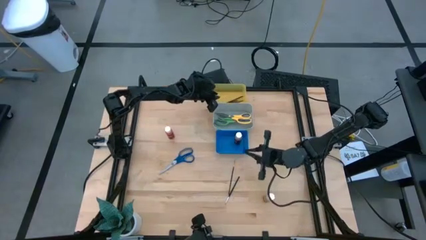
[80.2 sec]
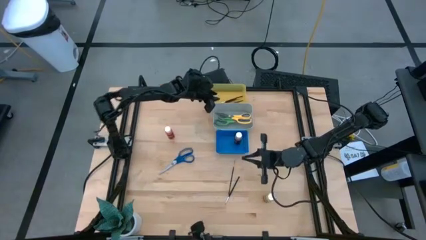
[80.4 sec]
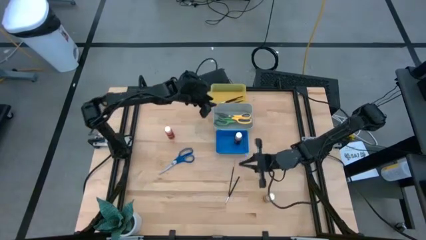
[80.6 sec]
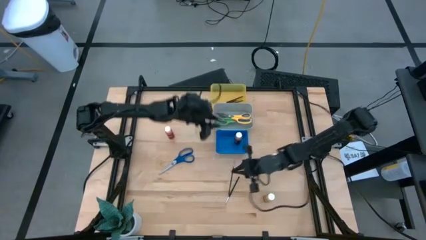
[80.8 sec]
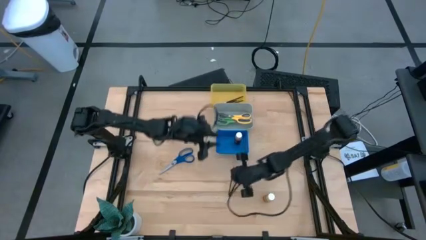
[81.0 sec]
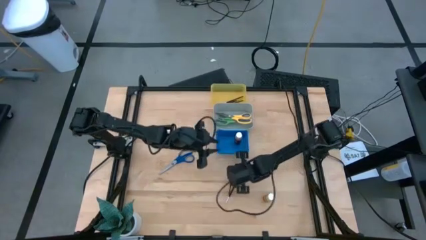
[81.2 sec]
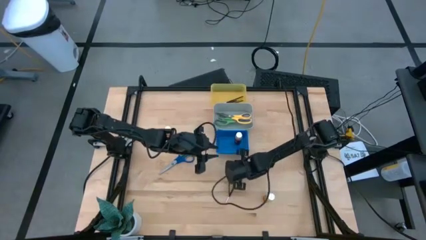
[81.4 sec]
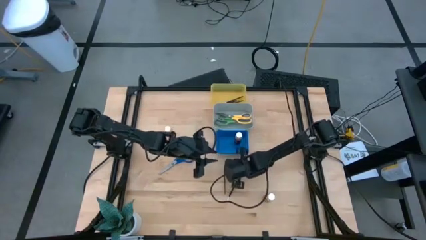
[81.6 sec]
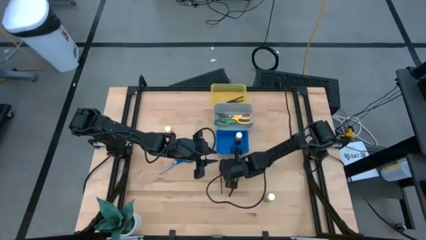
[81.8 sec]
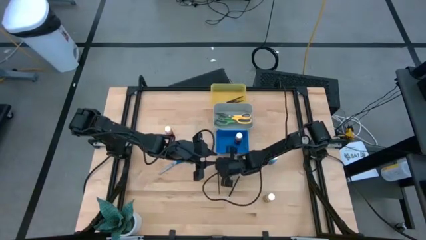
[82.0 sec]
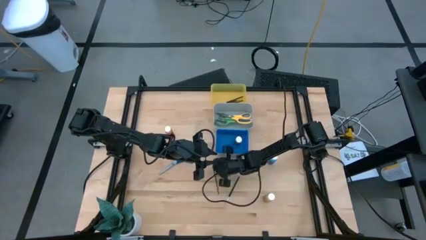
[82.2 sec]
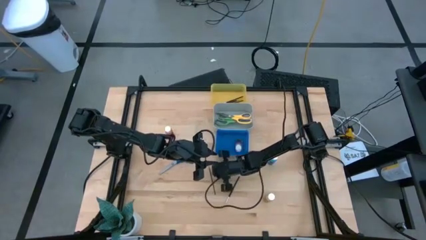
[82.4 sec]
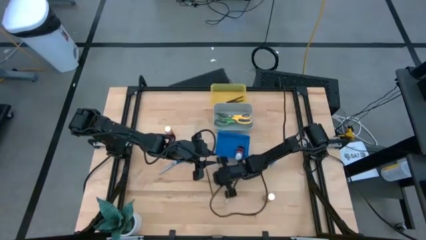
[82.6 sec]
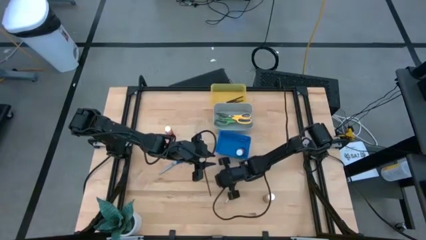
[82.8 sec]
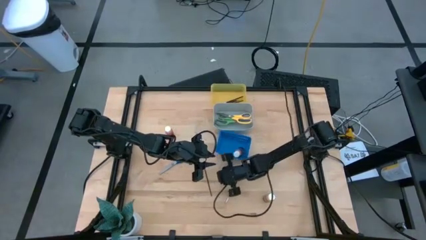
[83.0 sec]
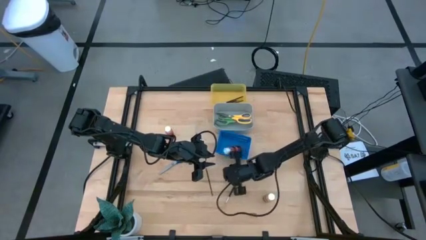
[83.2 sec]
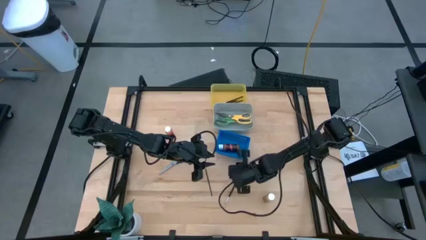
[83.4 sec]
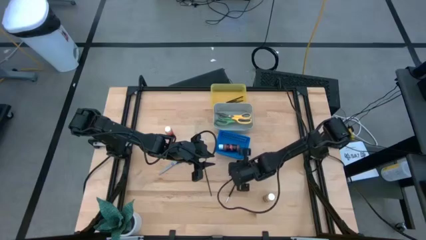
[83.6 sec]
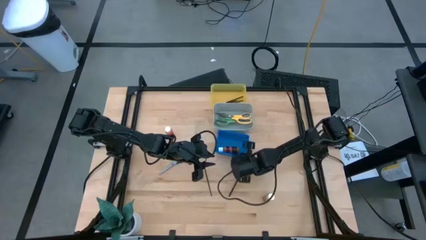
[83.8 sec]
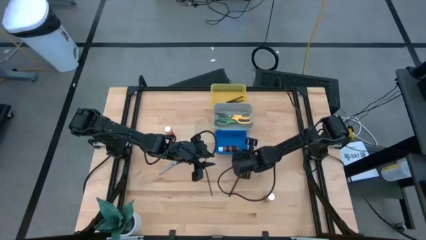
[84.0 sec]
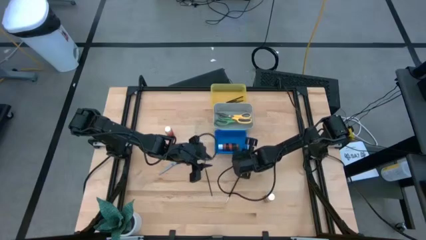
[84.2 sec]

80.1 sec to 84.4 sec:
Task: Pick & Place Paint Supplies
Adjust the blue bin on the table

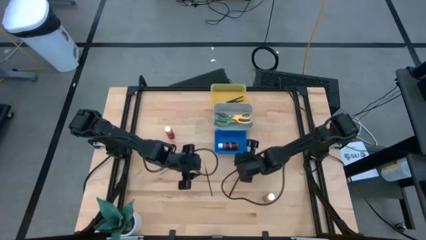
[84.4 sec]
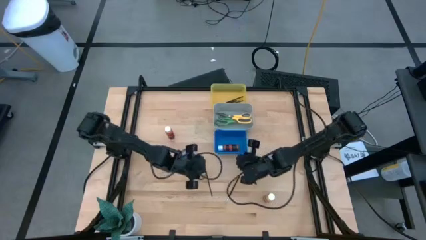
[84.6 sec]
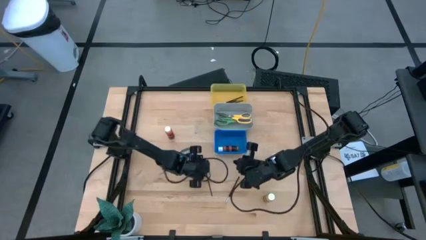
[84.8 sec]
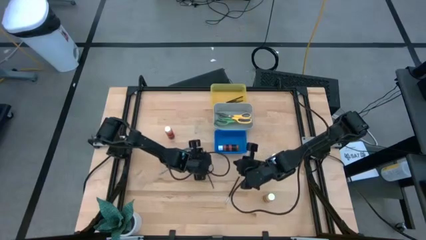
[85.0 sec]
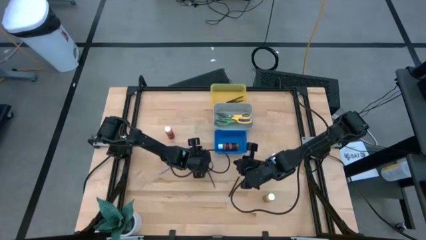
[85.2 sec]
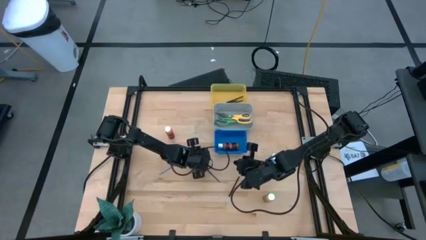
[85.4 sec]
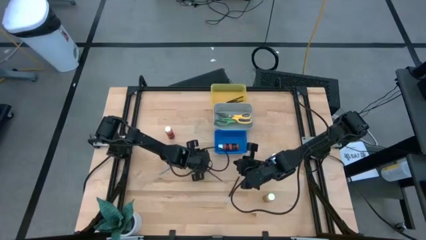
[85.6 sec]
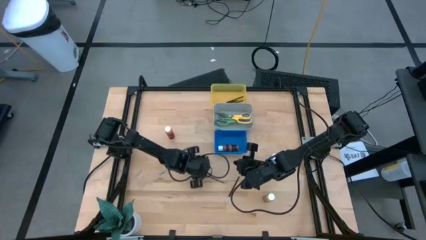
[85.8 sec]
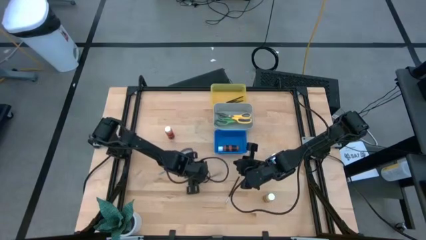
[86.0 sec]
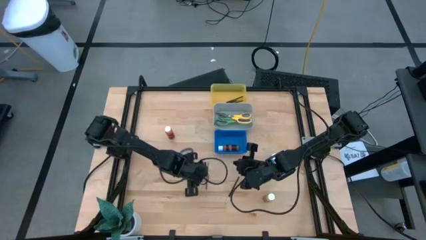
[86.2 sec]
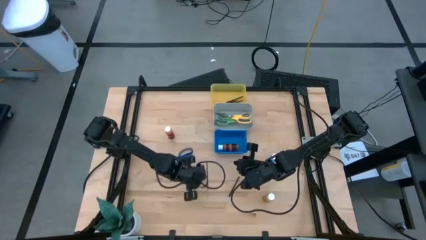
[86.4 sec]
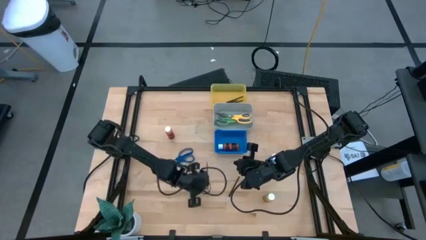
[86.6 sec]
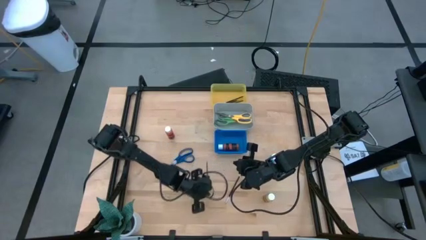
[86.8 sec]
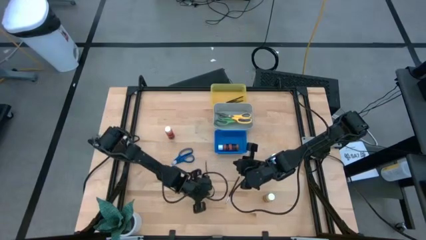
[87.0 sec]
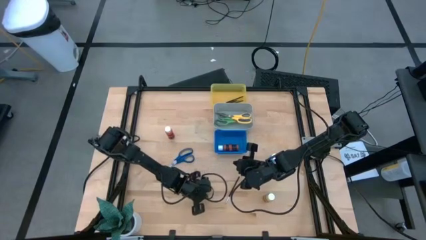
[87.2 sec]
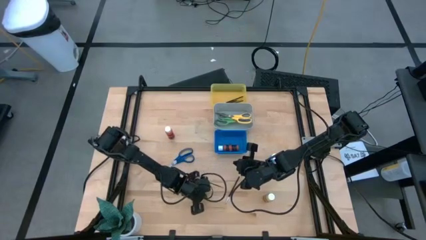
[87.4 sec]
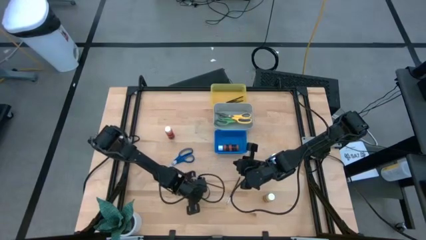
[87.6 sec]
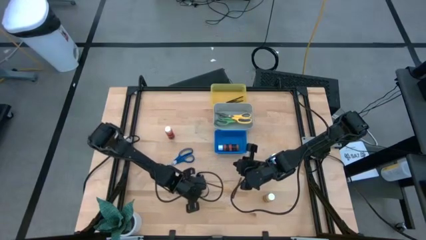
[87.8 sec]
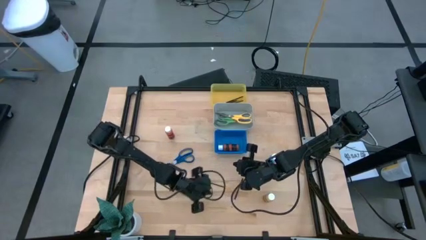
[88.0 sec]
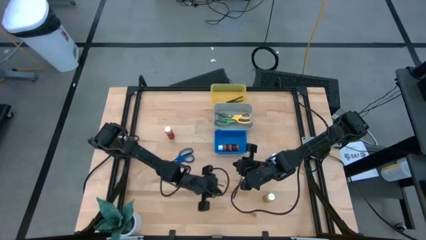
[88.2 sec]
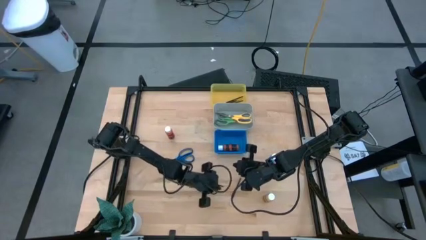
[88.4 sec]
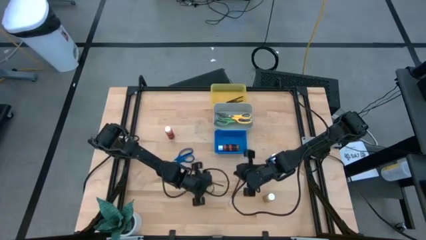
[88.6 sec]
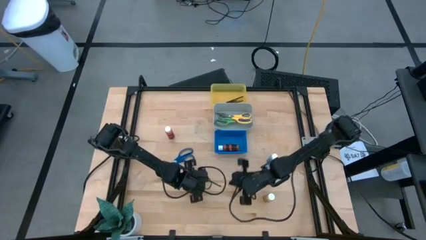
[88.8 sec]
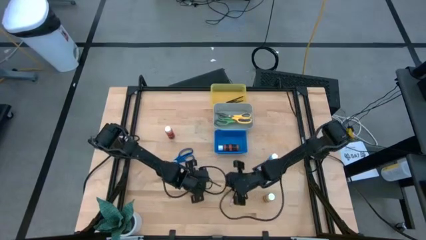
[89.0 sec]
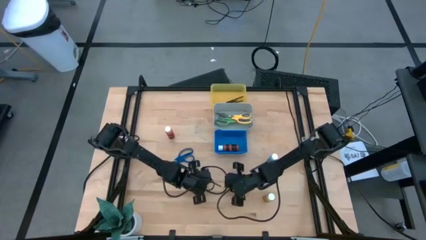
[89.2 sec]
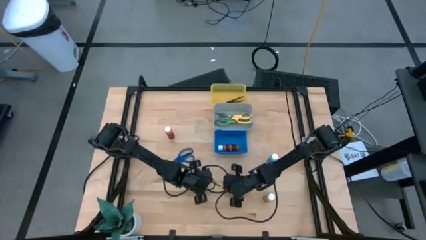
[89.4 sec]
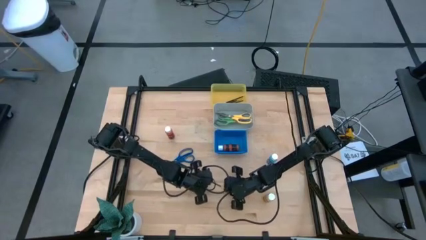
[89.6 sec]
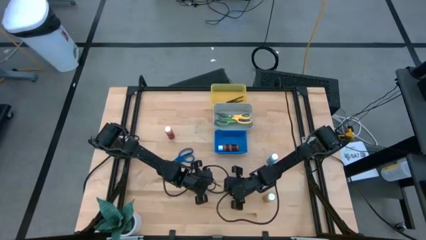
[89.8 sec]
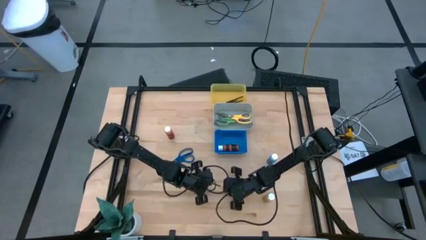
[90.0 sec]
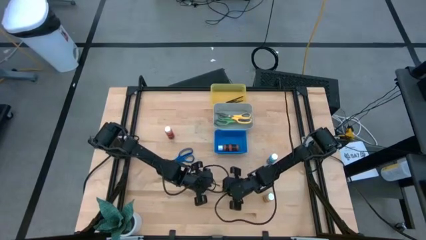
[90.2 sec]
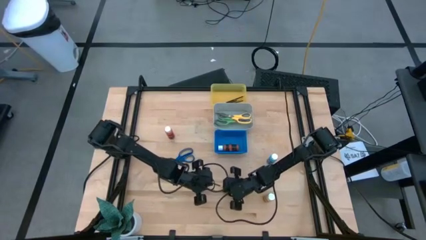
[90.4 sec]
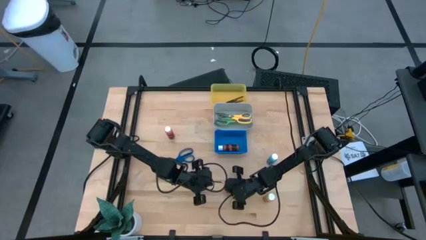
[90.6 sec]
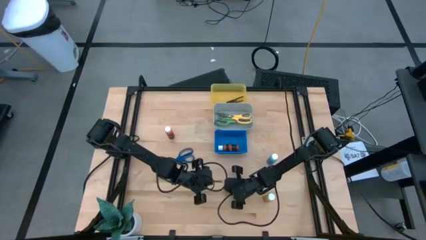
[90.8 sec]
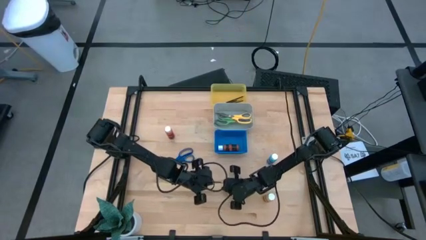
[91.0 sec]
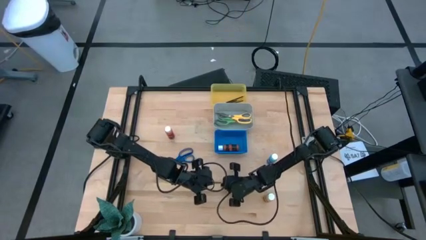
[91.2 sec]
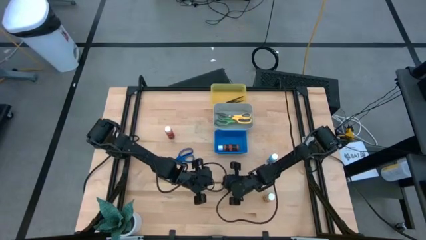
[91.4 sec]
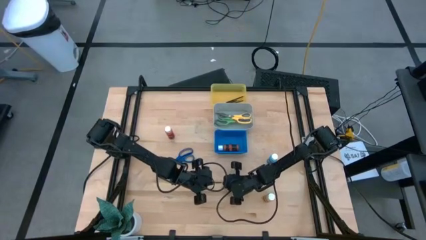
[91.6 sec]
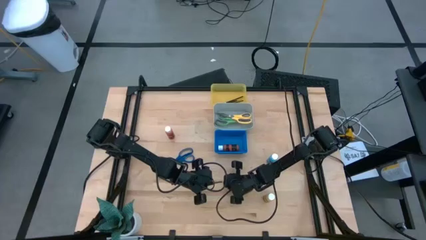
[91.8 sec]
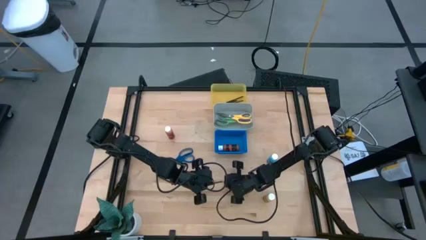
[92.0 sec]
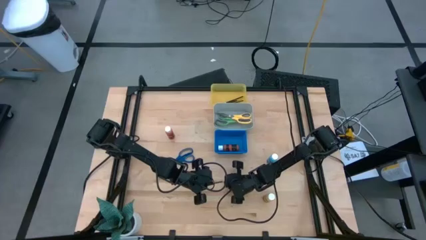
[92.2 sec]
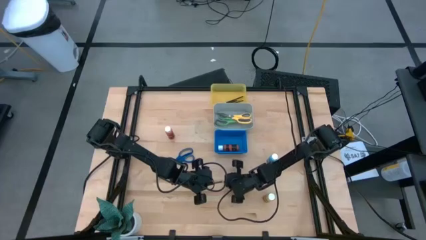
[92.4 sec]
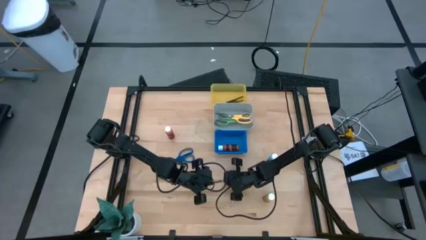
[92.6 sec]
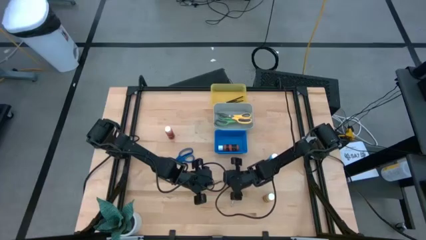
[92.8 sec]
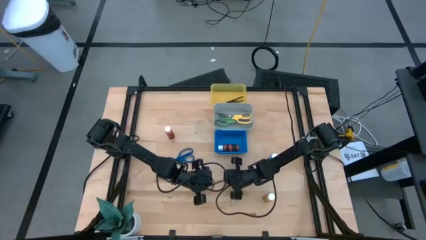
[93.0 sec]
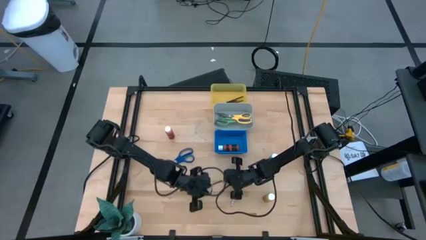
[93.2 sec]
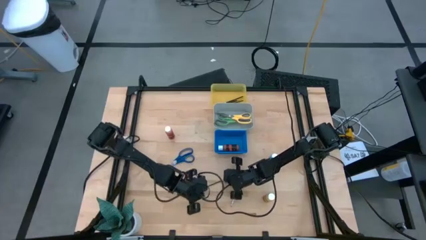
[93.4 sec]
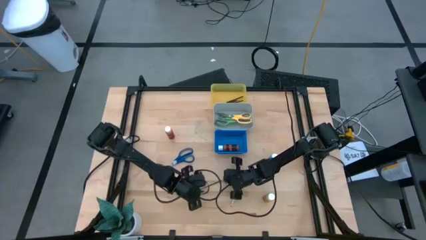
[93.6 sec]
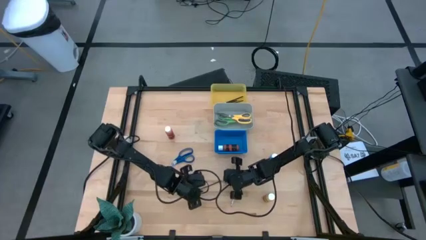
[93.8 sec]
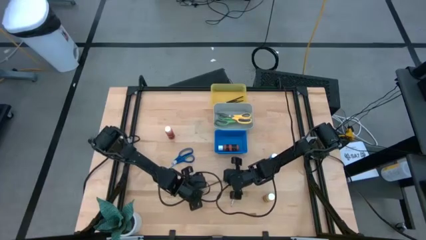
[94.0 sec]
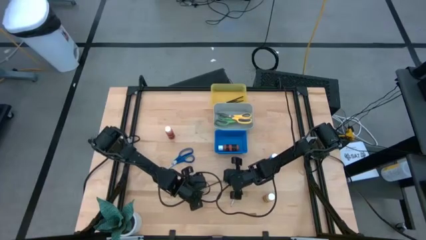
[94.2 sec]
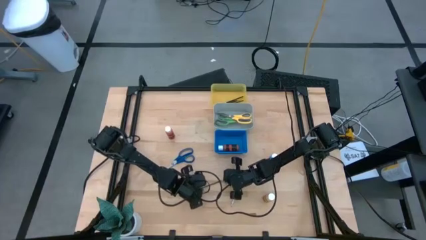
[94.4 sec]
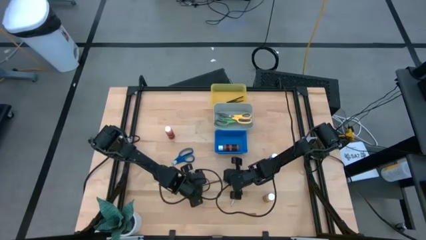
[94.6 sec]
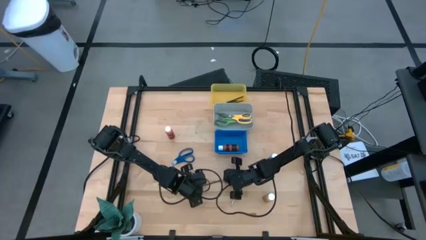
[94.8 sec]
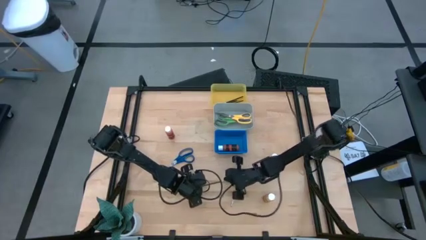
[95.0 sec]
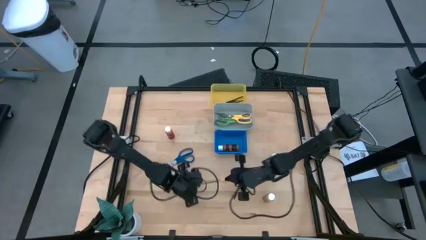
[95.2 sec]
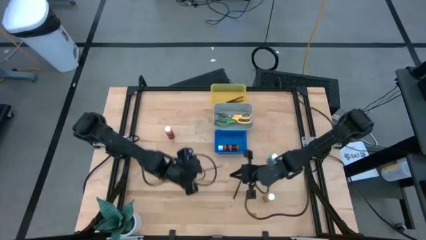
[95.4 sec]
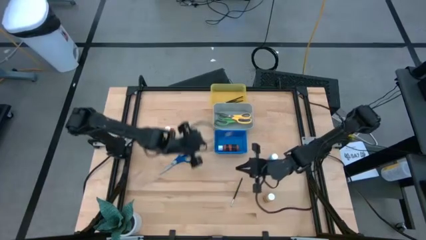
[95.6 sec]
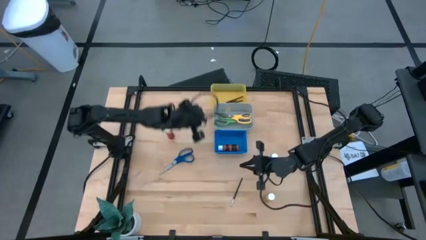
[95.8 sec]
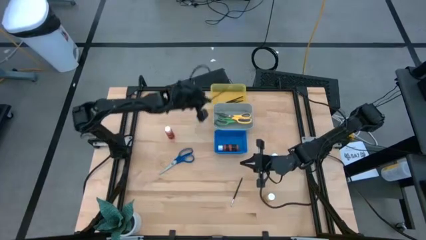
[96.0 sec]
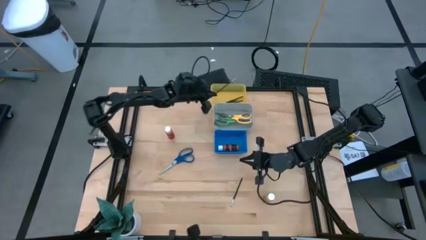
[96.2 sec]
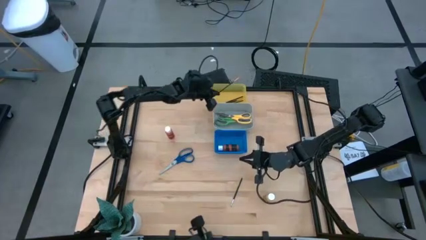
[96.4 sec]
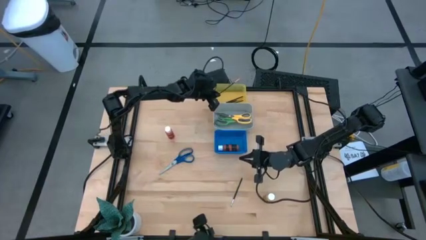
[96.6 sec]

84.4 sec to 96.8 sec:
Put the gold paint brush into the yellow bin
